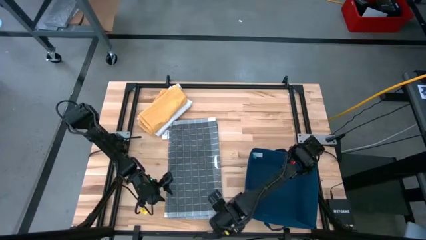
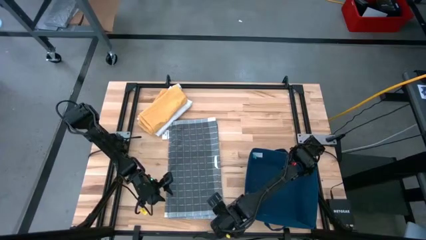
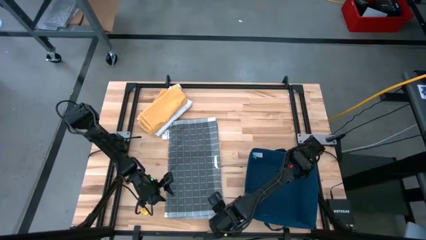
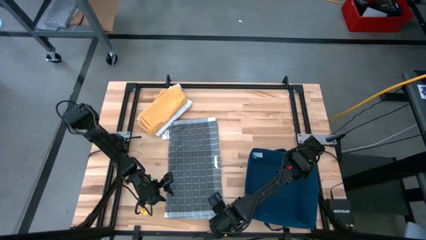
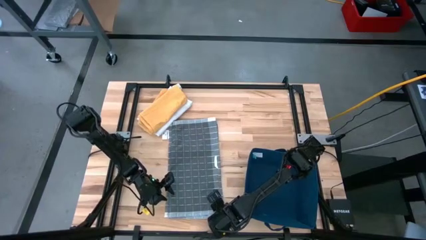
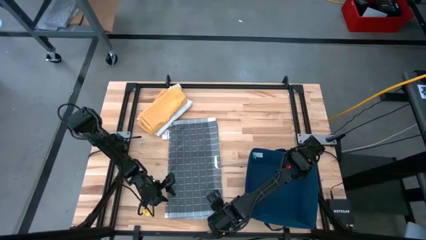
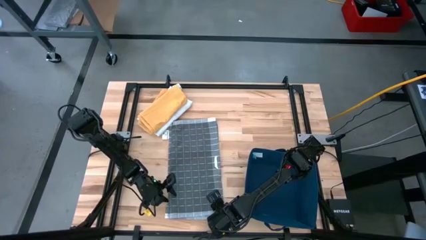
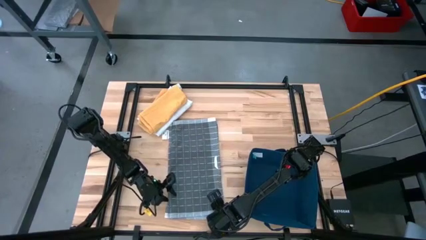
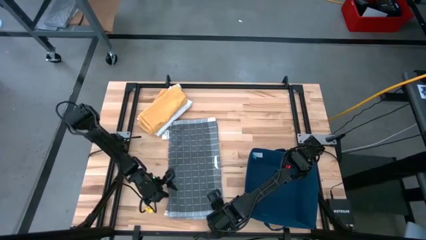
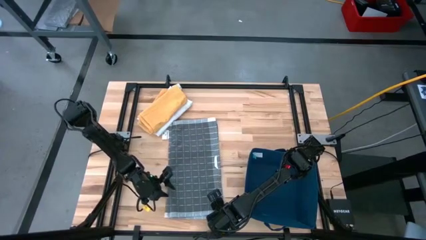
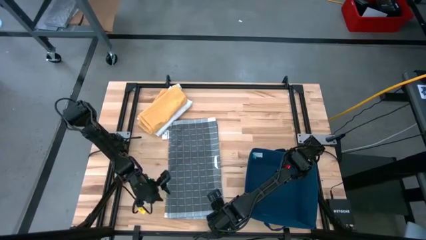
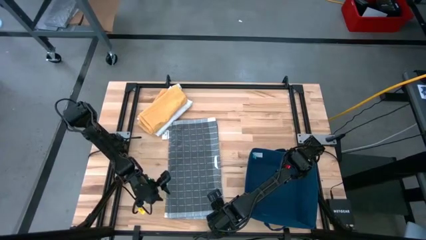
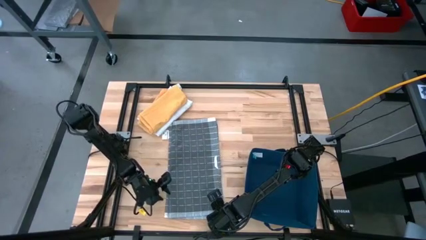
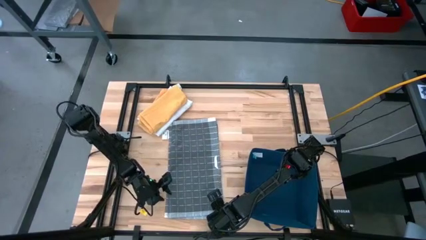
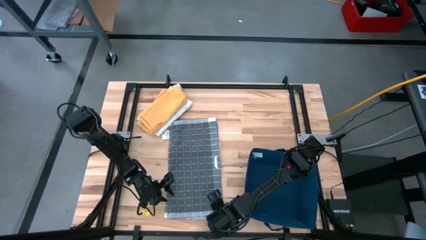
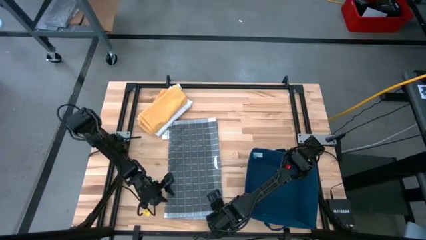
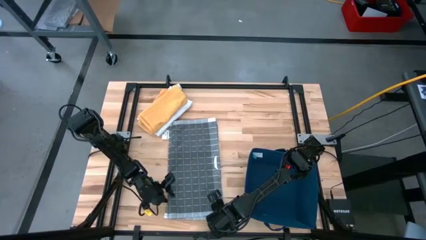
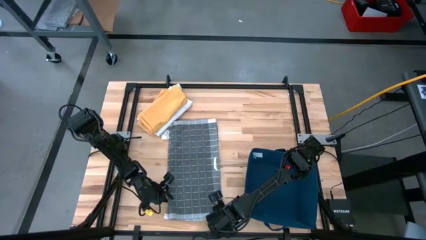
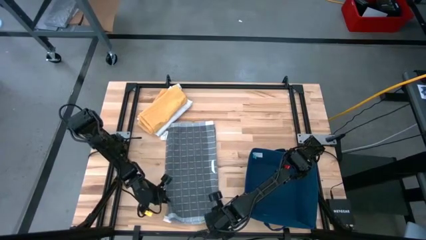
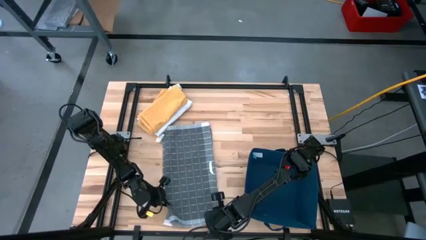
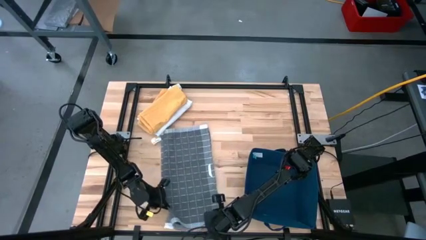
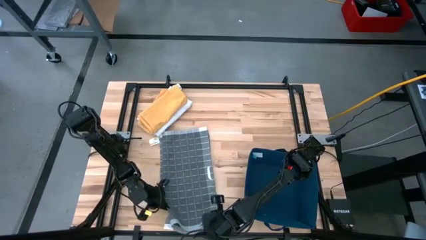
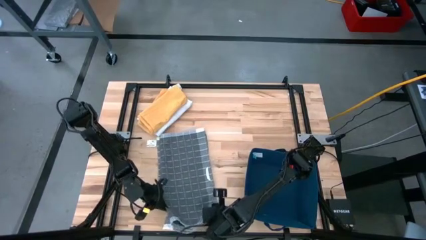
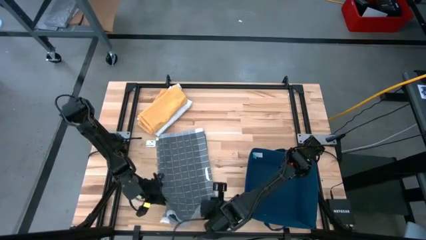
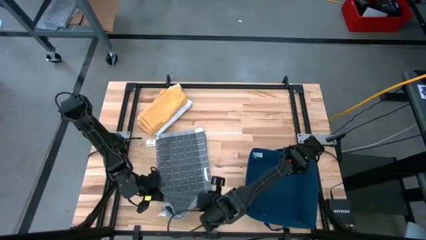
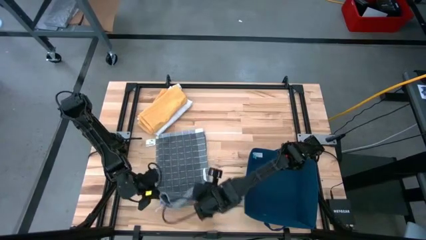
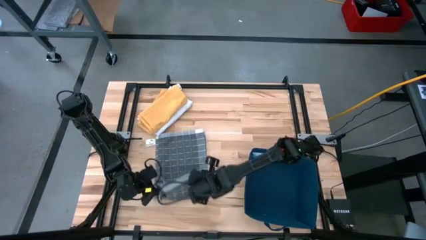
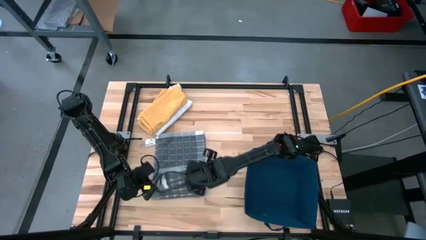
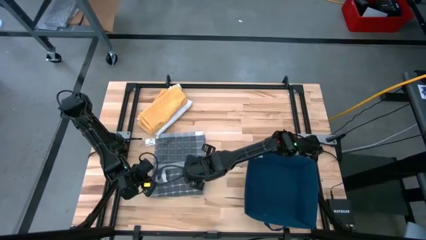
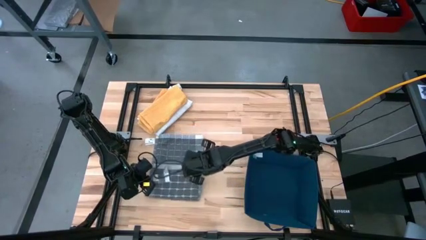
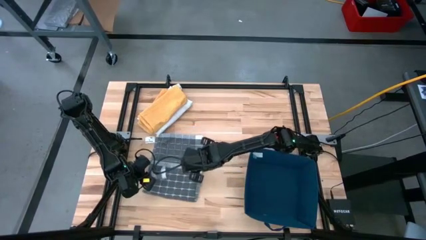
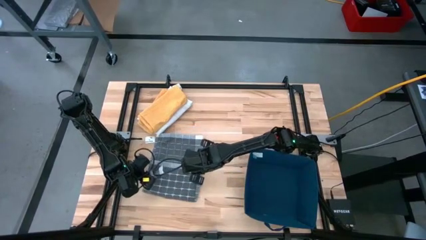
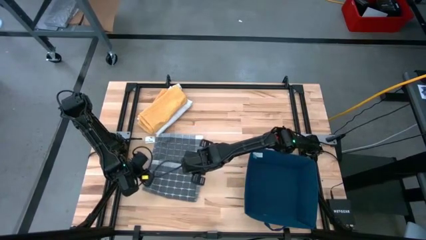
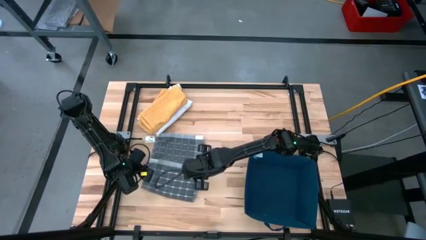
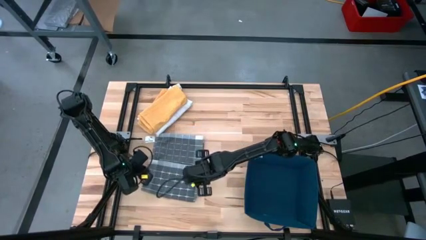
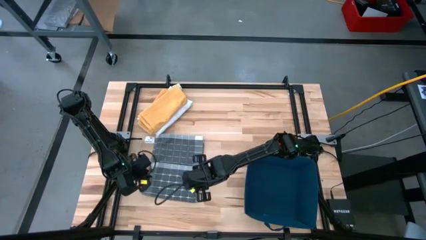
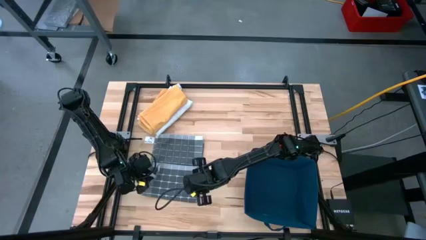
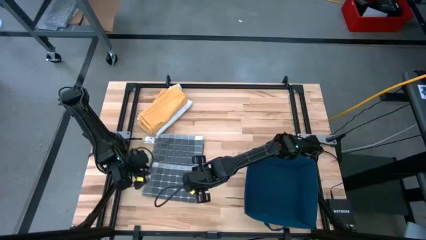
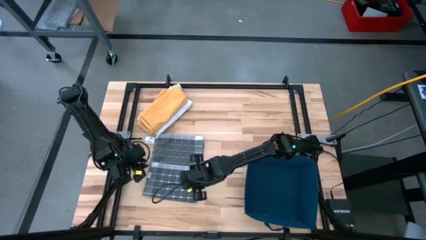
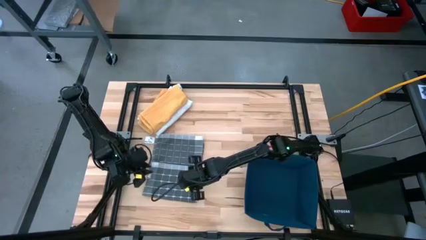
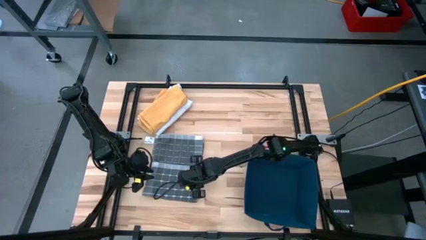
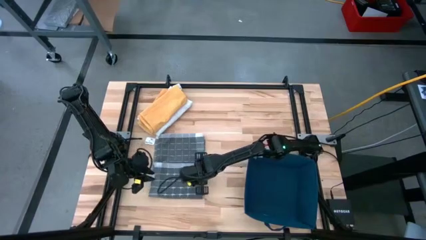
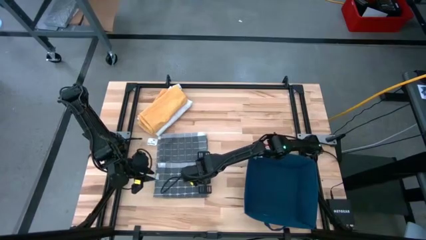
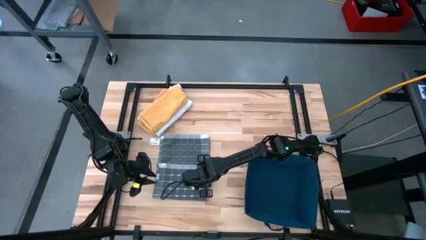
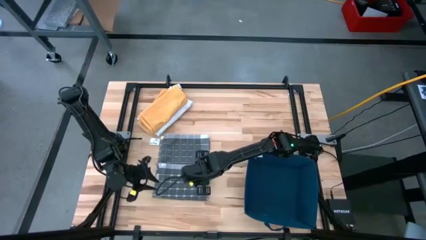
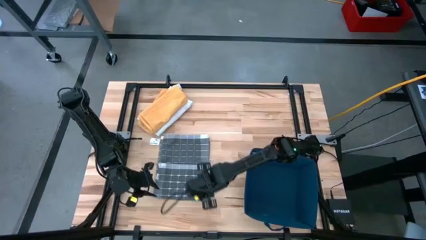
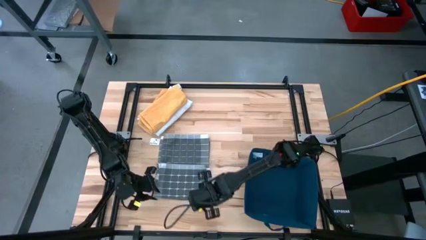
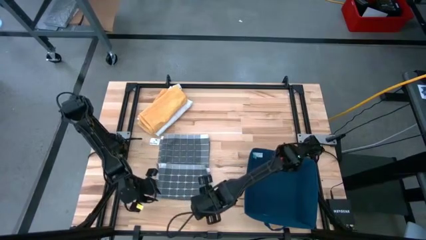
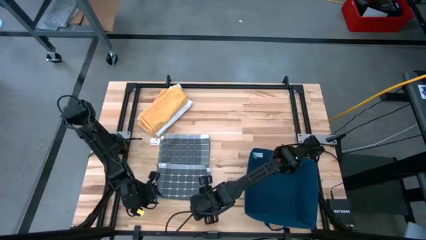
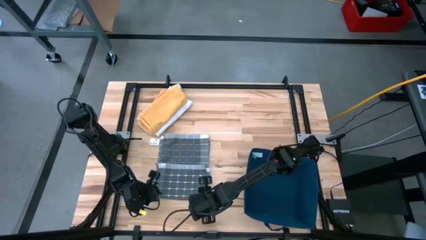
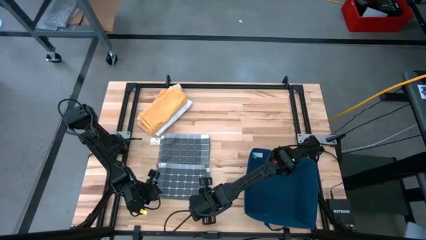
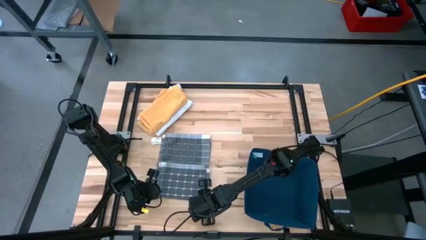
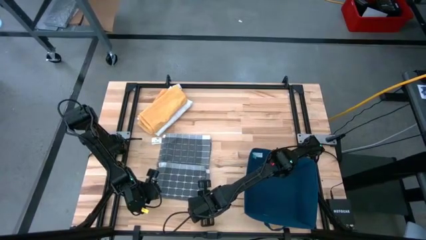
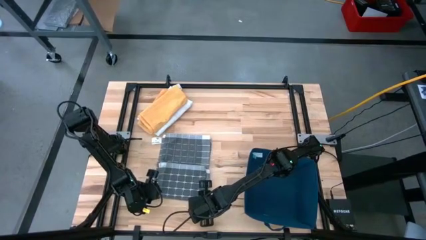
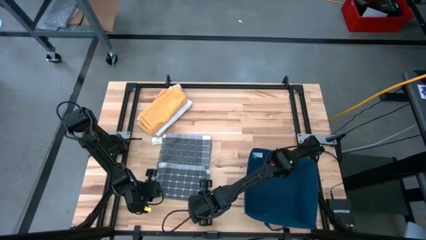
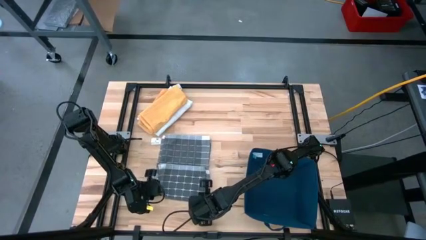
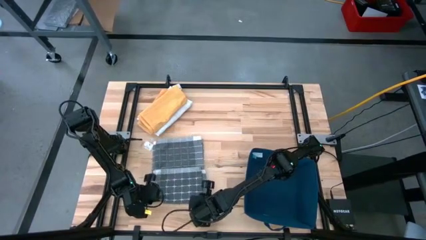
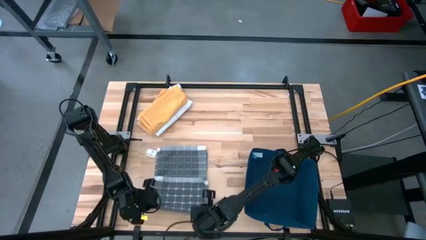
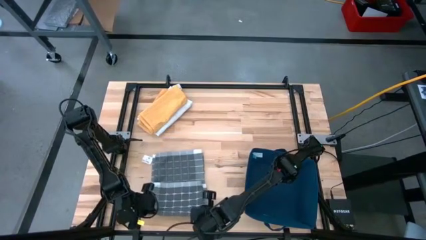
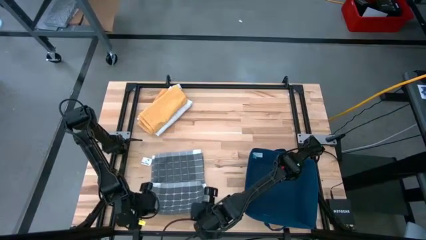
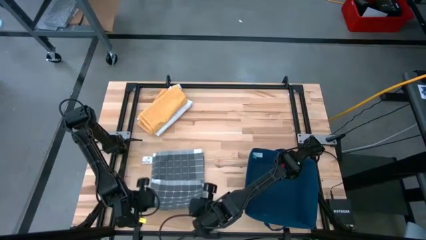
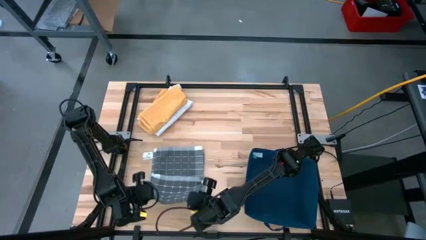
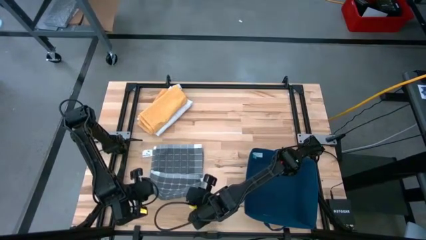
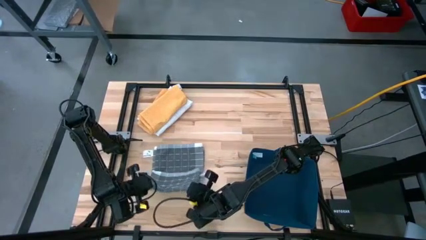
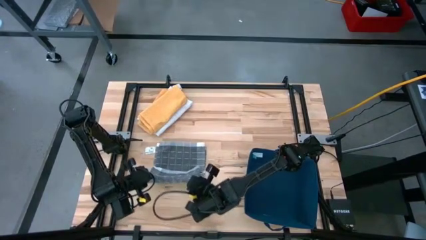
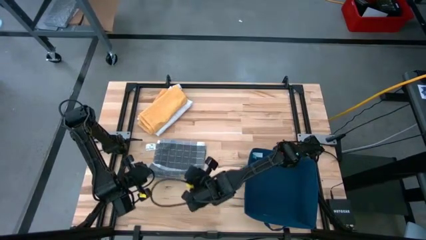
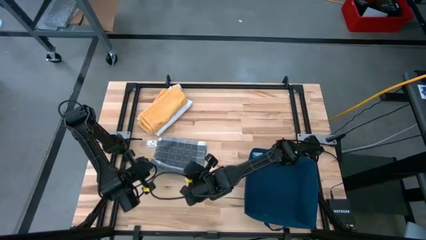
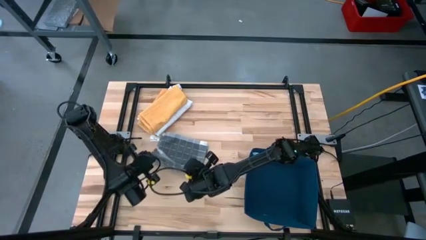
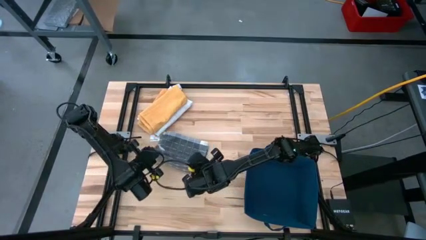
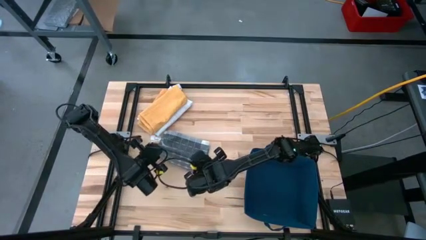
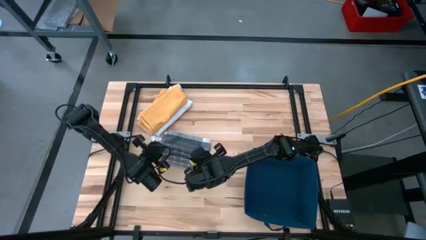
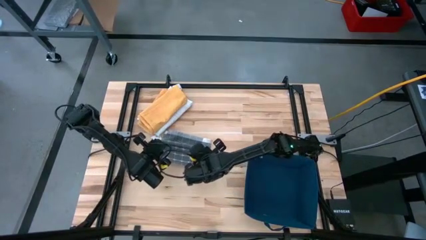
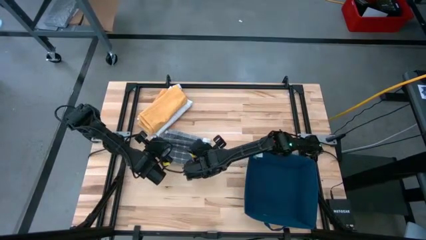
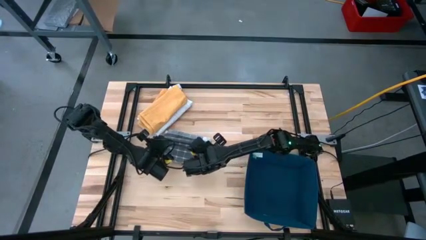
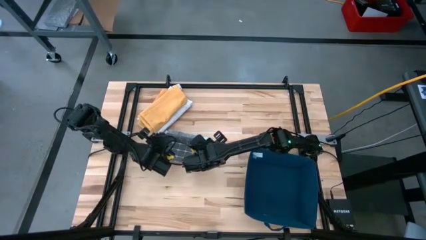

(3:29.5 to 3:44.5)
Task: Fold towel
Fold the gray towel
